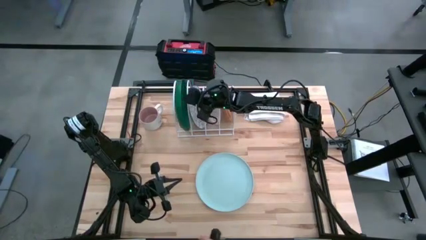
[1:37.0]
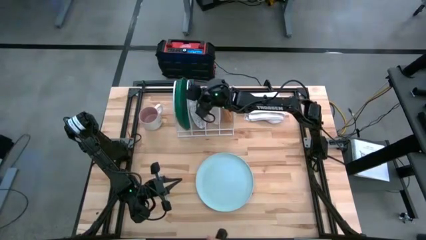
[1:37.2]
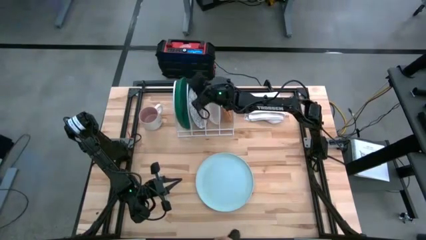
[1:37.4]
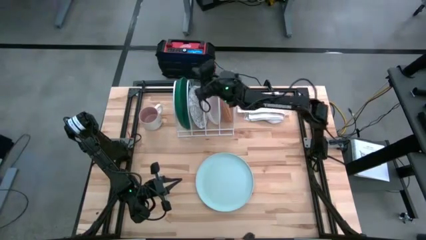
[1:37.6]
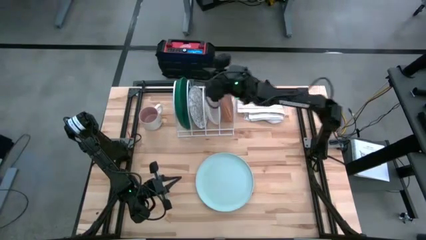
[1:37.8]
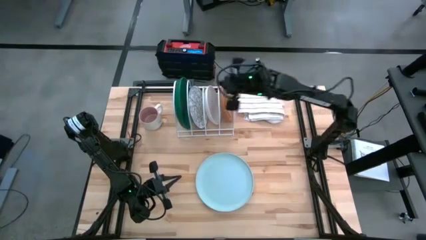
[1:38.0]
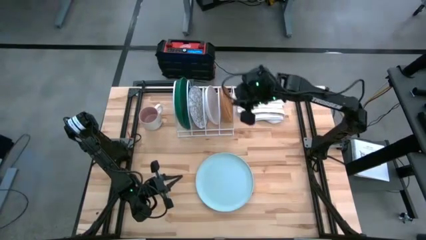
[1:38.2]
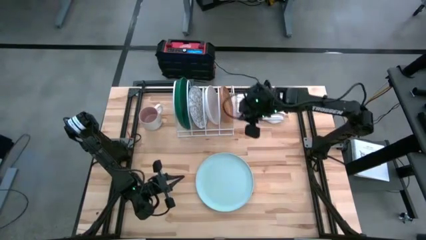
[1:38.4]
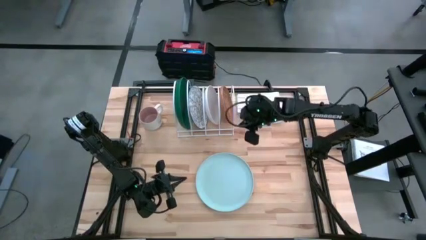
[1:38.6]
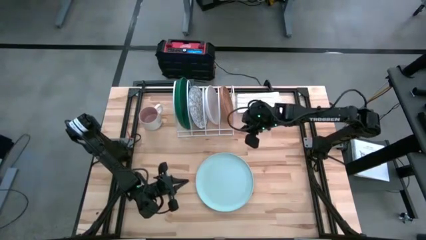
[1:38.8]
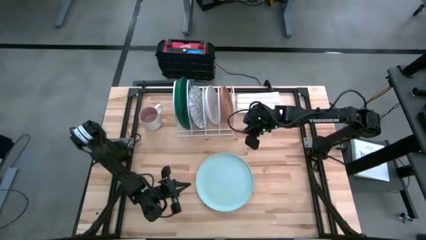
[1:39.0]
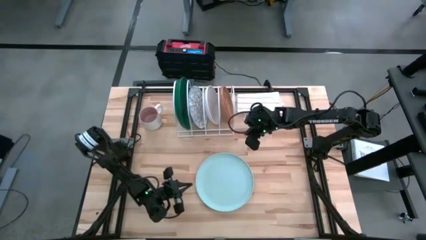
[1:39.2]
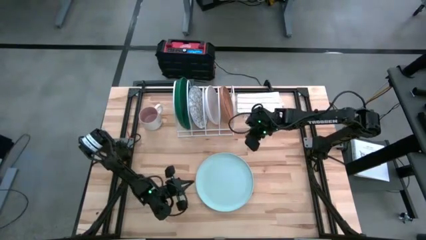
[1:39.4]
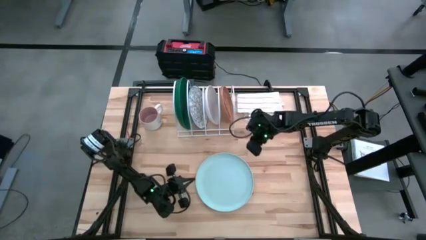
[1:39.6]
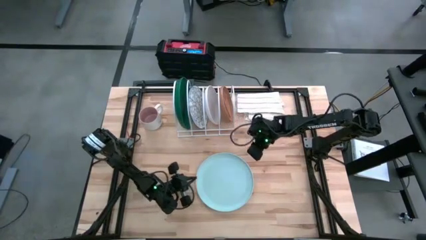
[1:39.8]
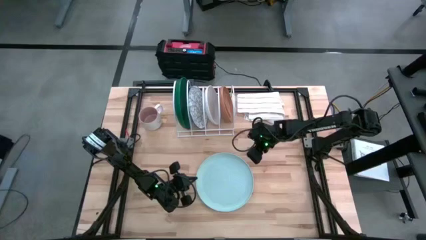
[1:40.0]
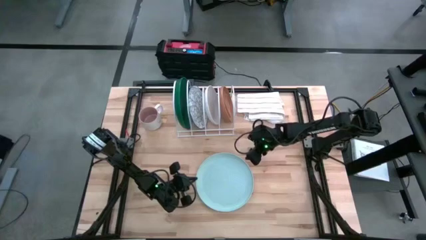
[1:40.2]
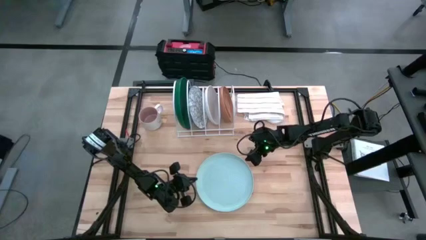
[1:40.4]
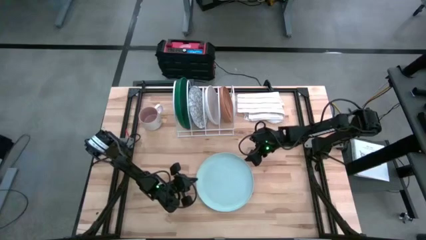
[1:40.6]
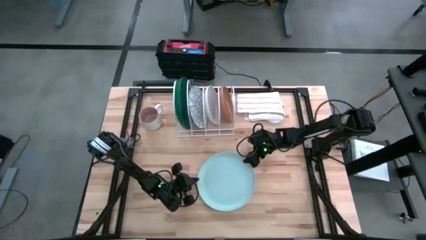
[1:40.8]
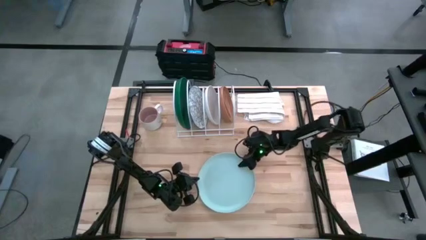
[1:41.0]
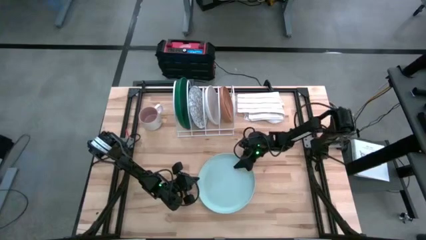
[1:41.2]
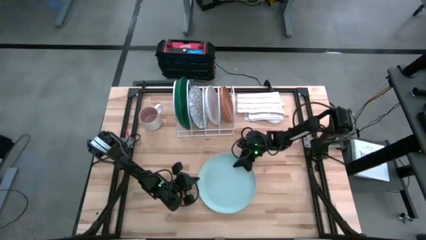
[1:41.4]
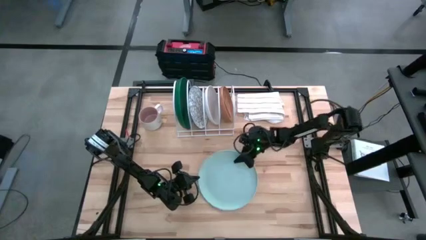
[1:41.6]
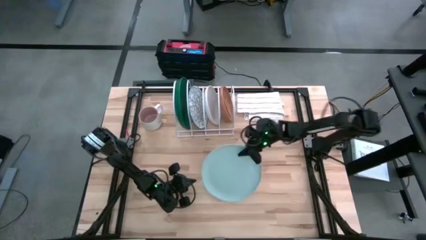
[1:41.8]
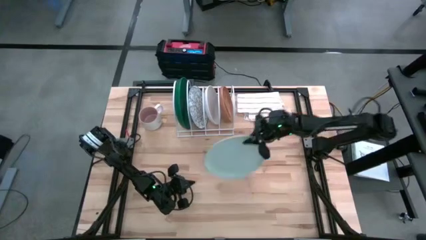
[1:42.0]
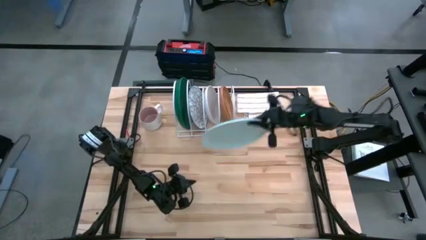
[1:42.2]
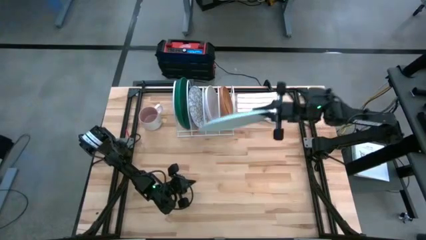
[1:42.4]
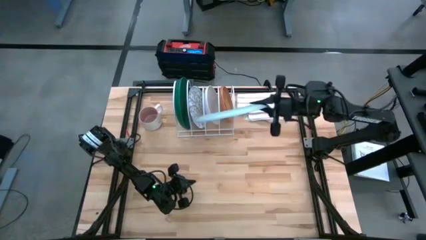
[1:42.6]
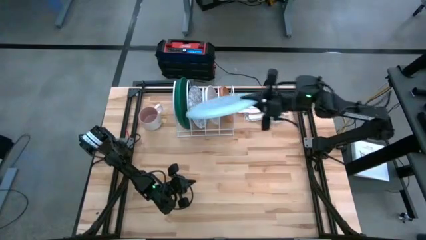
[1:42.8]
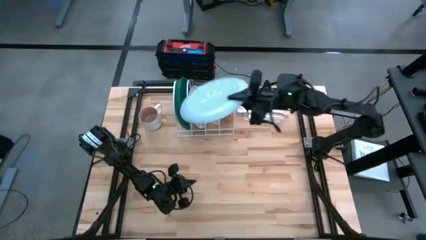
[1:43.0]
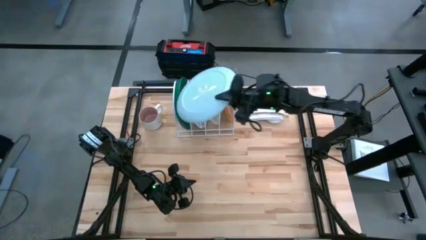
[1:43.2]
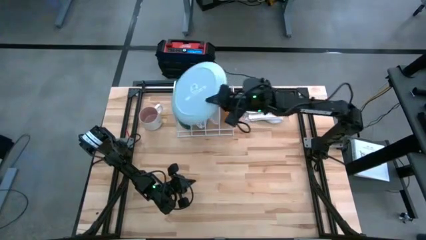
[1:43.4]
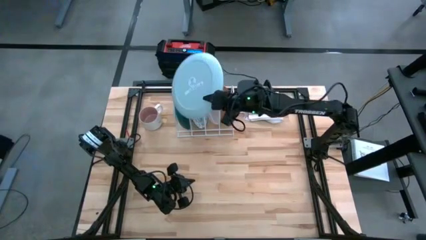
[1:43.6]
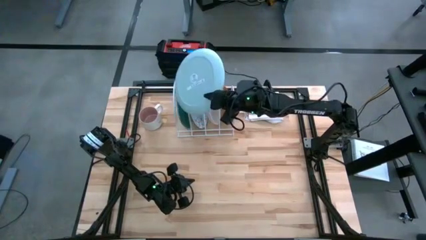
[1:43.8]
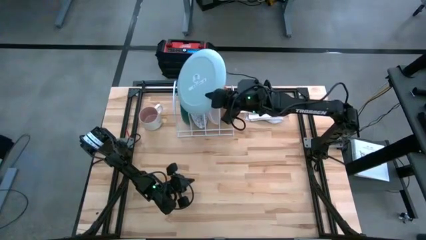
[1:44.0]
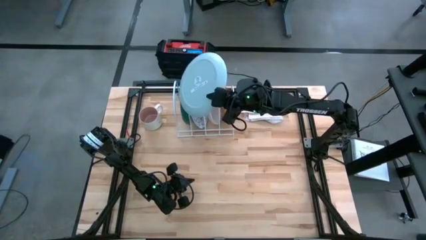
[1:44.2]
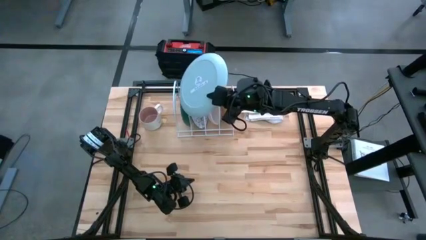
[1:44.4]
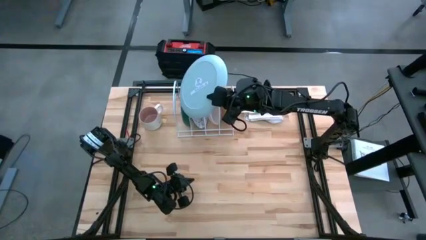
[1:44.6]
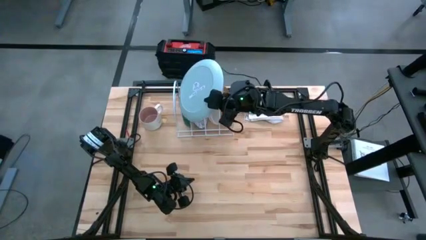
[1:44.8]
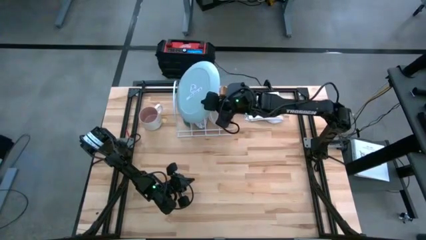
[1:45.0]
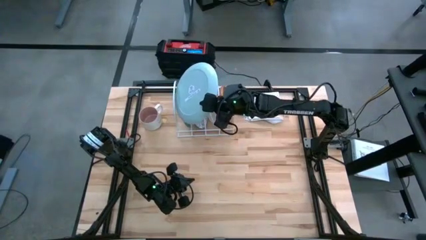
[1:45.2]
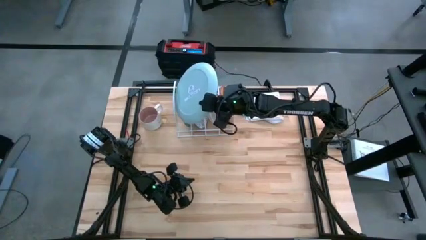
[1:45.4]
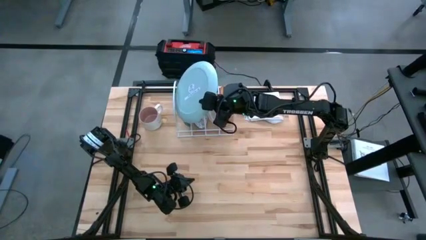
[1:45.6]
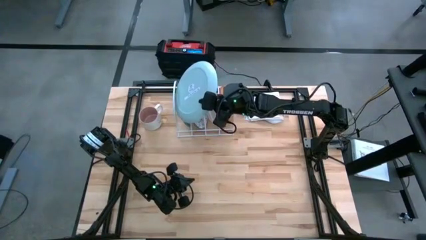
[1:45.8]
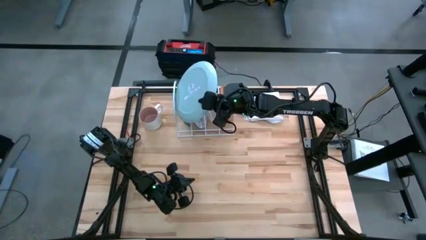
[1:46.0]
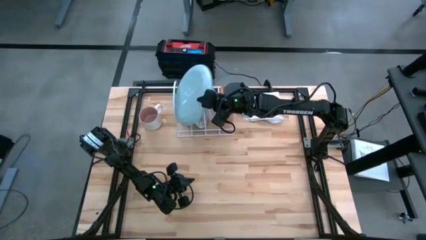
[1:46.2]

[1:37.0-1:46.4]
Task: Sort dishes
Put the blue plate into the dishwasher rack
